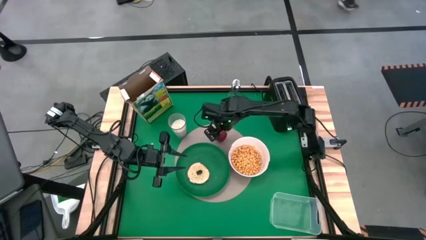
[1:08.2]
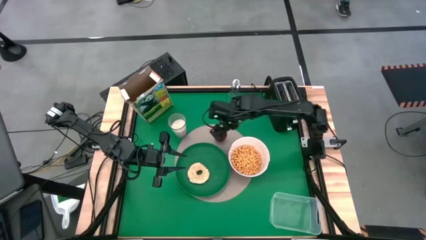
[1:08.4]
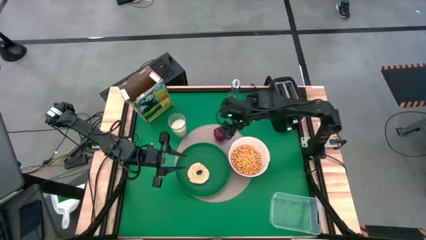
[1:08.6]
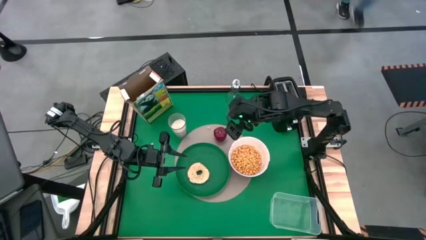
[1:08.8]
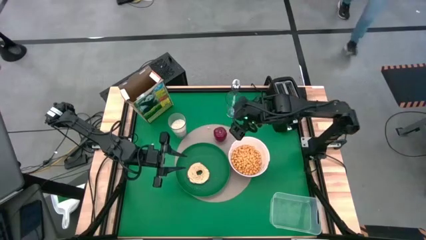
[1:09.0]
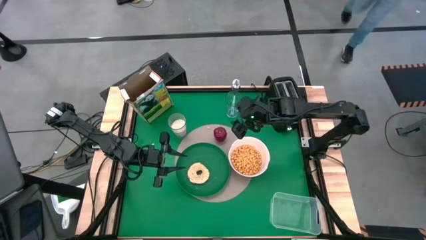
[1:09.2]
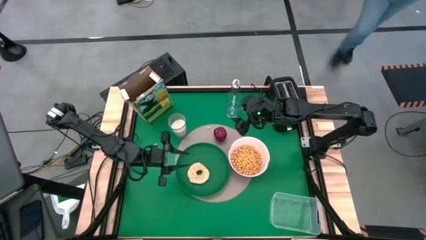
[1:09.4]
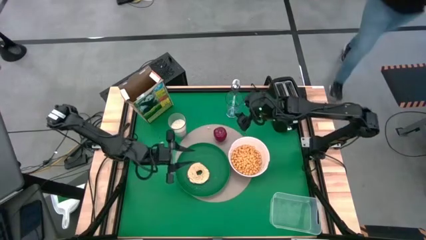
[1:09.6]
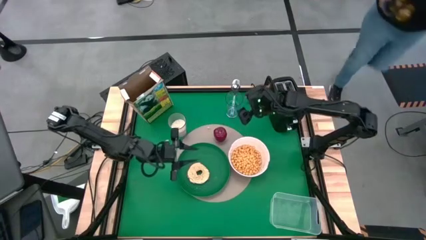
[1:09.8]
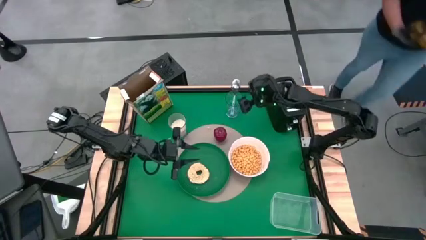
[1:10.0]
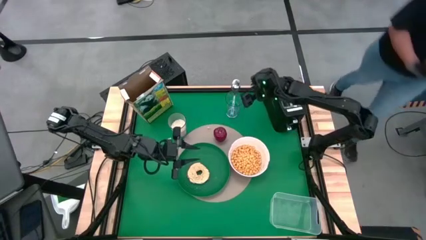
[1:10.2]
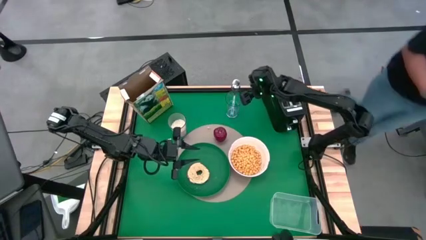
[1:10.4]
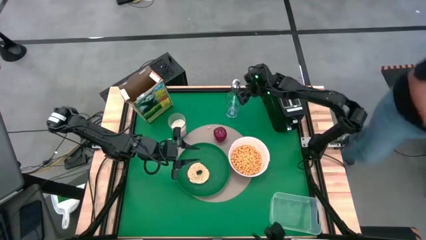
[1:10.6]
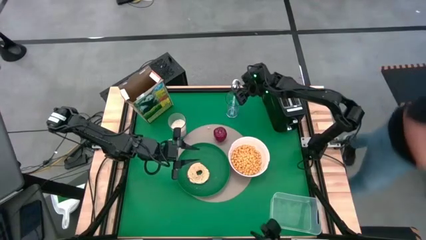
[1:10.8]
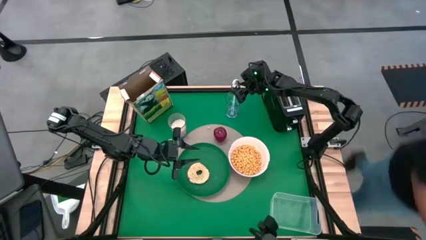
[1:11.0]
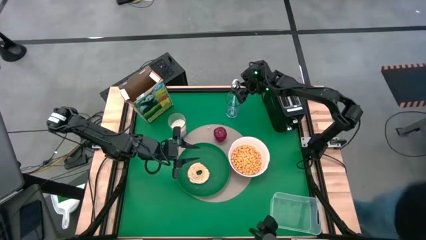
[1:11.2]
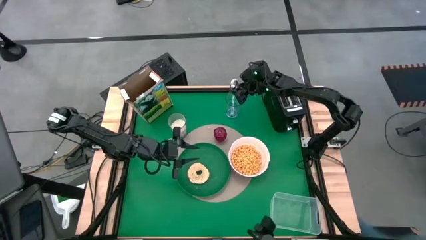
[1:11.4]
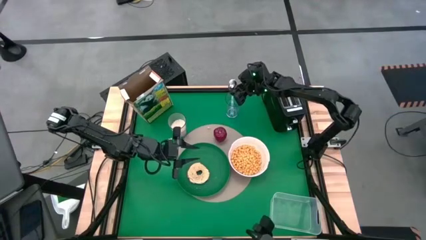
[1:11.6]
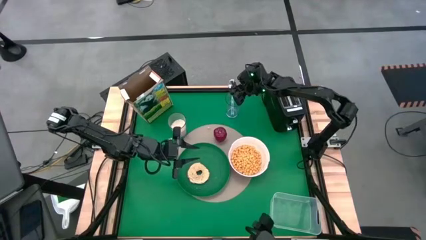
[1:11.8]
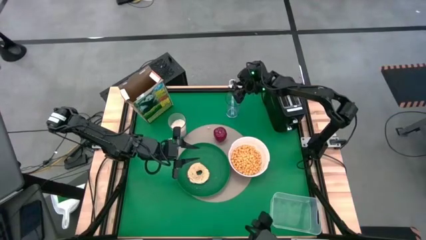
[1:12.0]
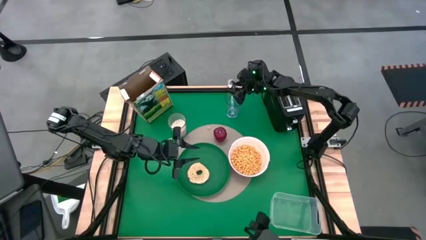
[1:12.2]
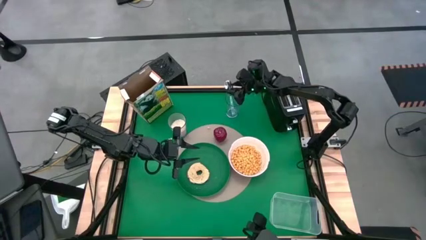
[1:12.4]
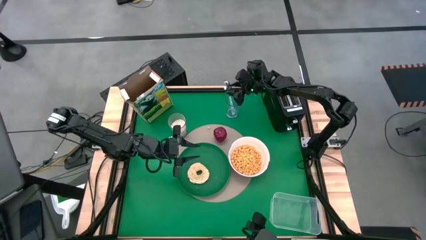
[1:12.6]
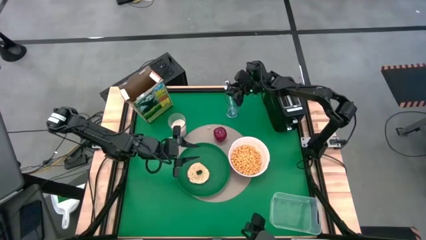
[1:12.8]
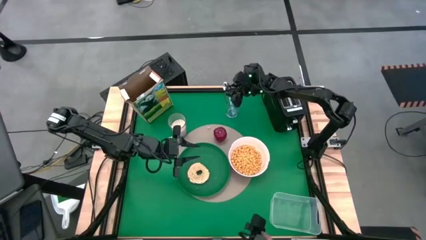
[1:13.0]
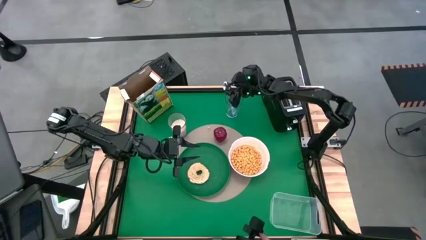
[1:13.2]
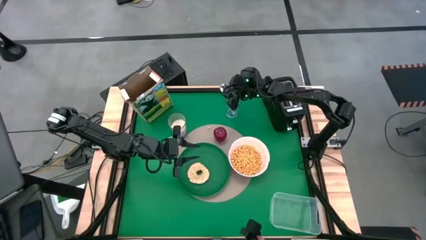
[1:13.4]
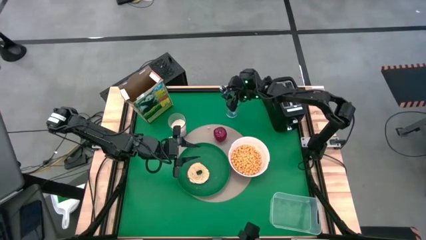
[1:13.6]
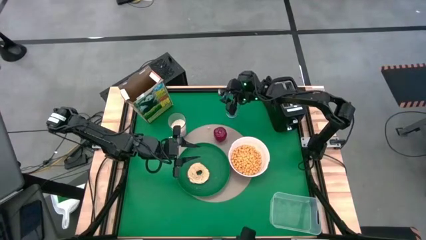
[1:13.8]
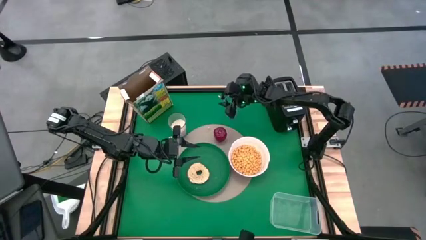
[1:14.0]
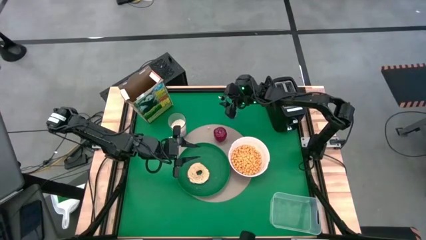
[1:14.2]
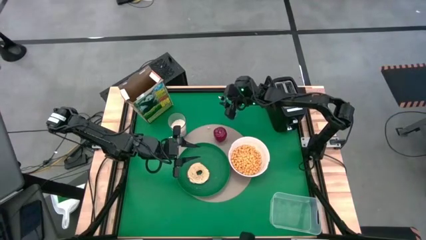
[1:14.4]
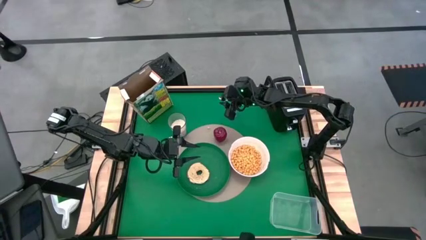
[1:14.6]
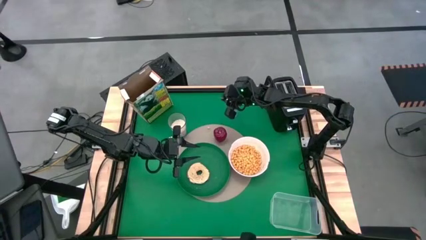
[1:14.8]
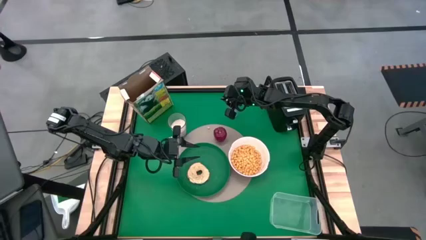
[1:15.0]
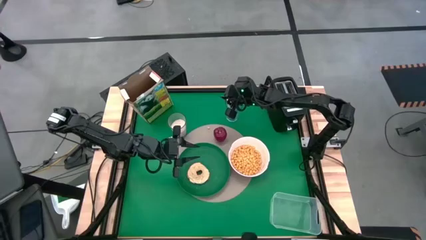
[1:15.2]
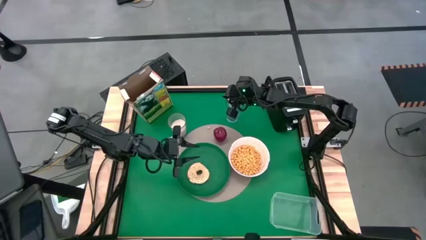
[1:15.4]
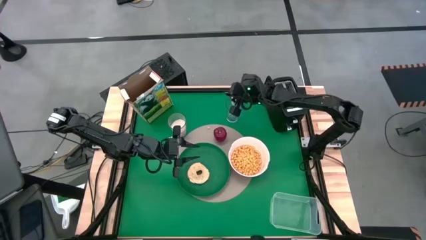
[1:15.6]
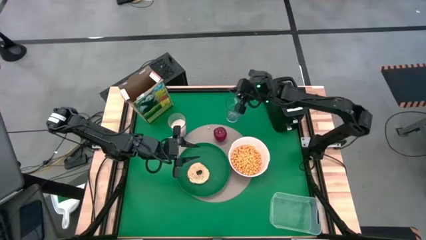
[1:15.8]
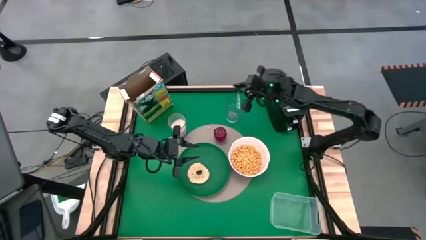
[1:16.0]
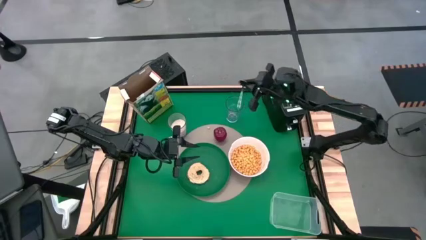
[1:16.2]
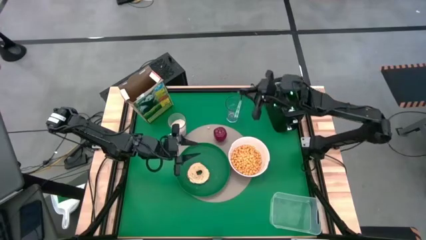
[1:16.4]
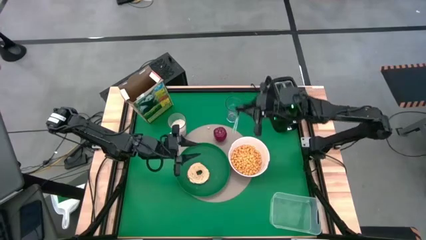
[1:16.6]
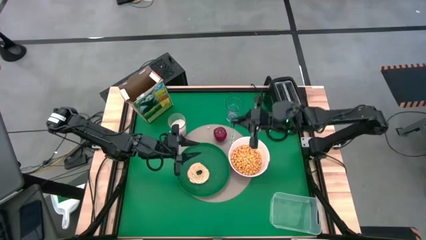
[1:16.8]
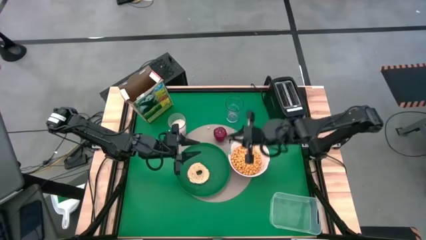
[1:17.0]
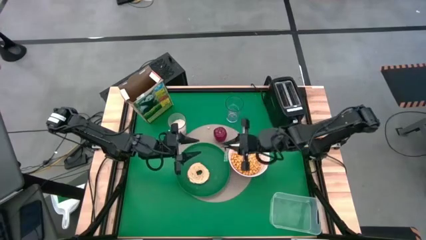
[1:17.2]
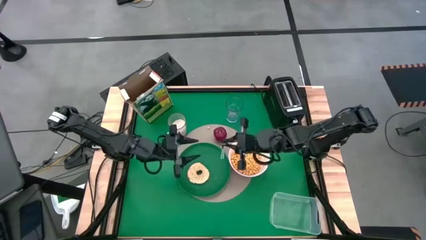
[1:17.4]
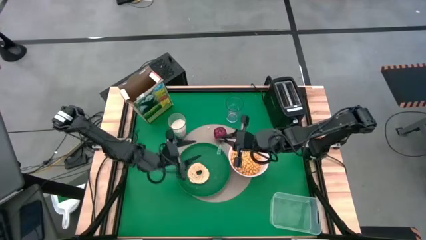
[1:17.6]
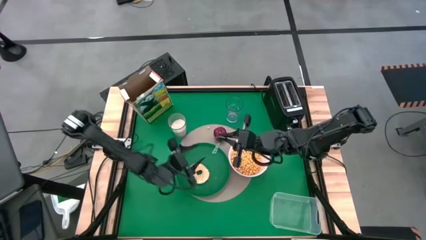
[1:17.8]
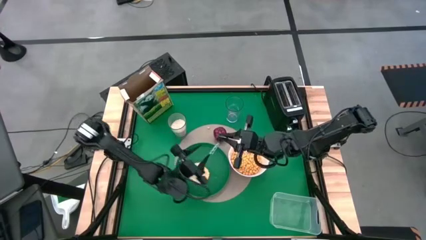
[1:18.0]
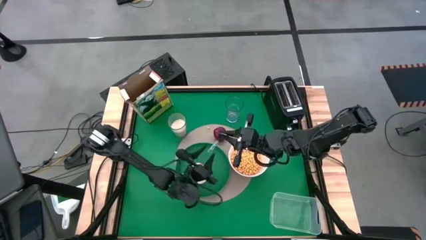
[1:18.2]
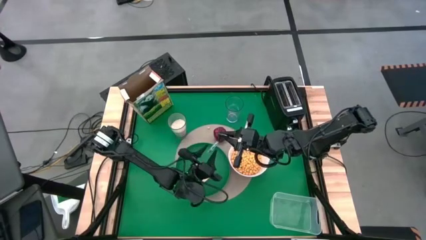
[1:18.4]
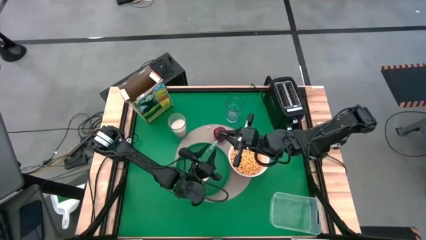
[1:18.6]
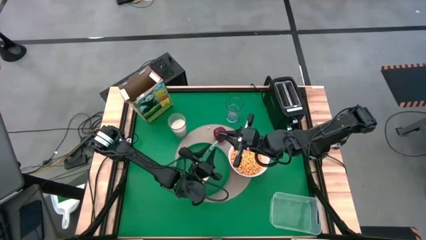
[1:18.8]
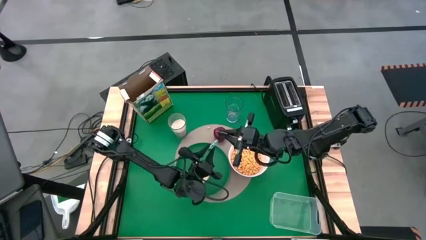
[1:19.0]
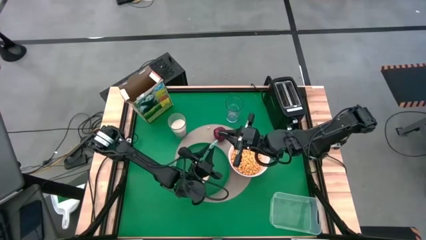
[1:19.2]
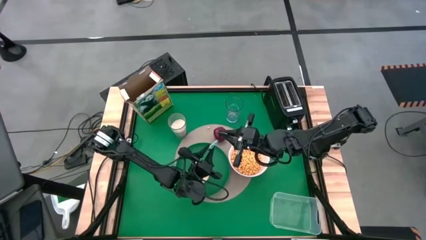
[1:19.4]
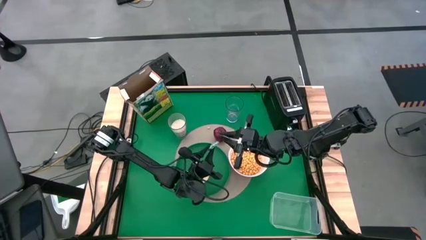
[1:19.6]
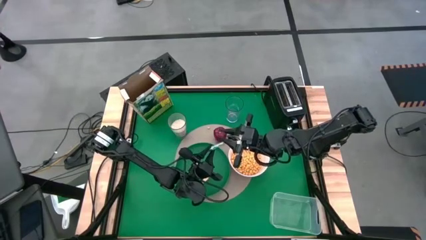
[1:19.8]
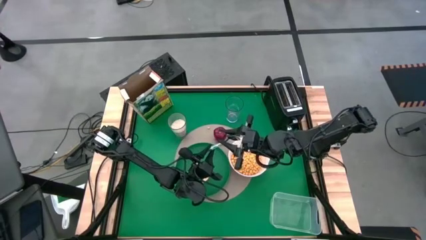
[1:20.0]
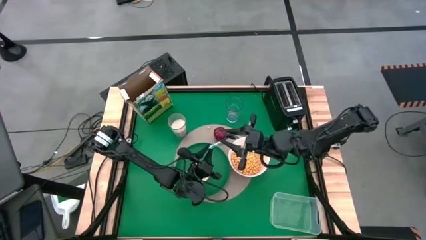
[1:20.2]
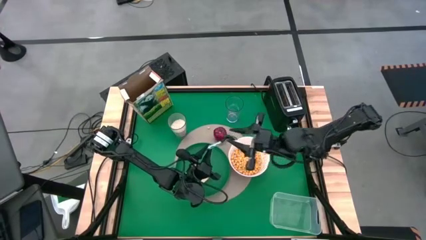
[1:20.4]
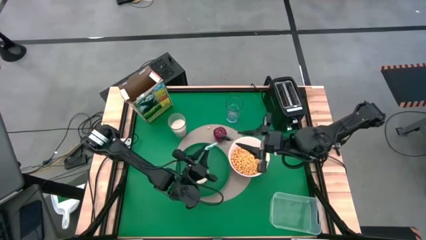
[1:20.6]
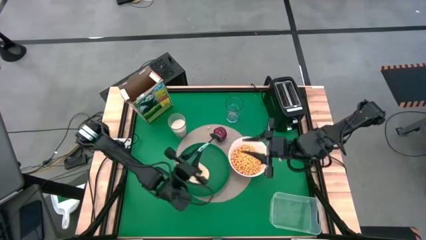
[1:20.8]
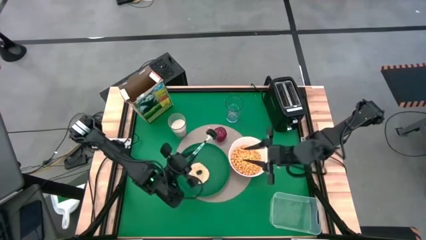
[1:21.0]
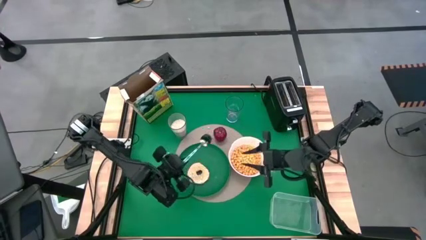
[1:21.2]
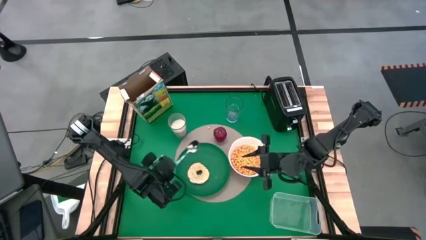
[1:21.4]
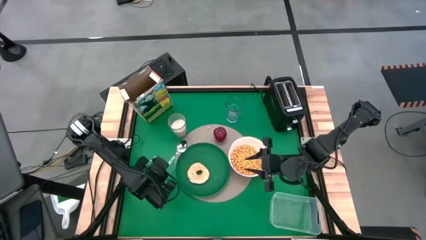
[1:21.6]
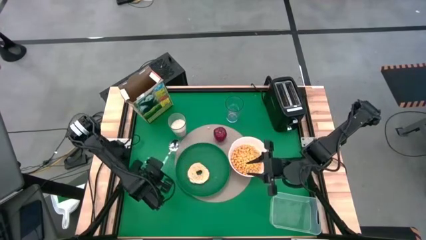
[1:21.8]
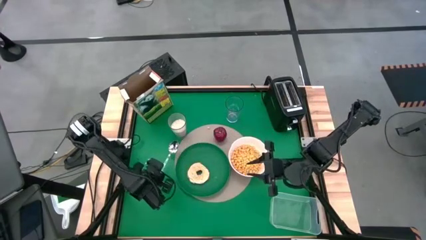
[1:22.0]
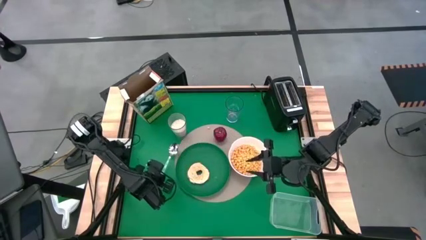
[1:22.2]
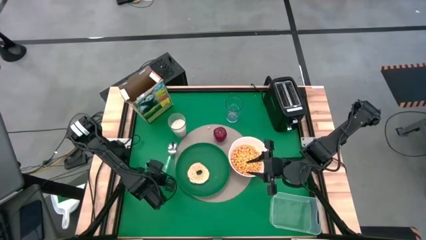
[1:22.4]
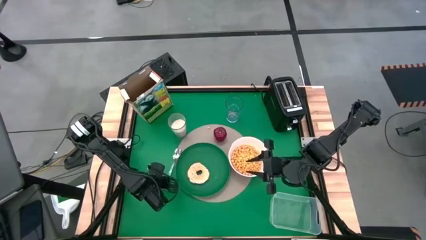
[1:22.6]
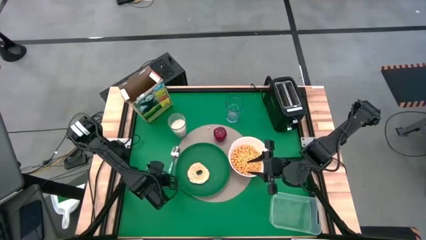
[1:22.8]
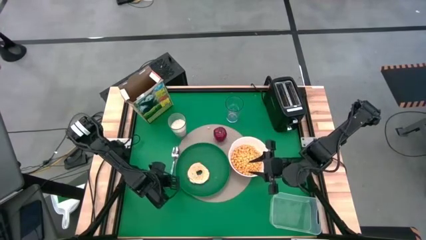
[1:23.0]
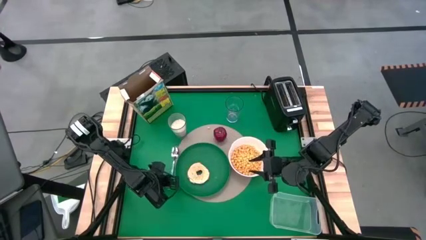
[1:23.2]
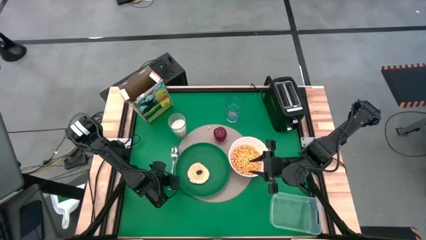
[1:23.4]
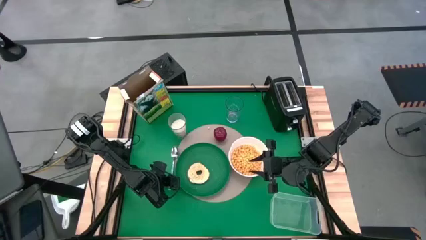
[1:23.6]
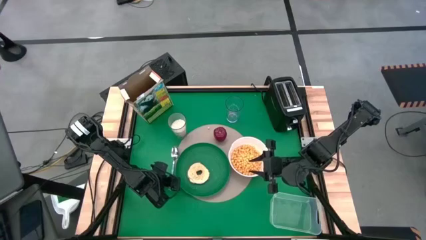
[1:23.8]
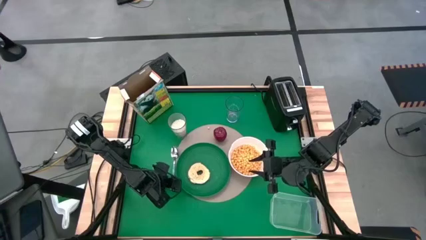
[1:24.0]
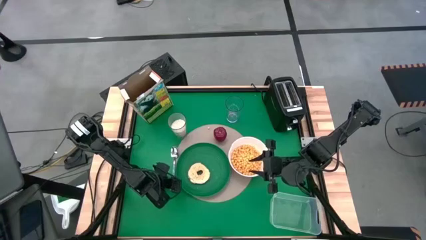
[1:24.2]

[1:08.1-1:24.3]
Task: Arrange a breakfast setting
Put the blue spoon beside the green plate
